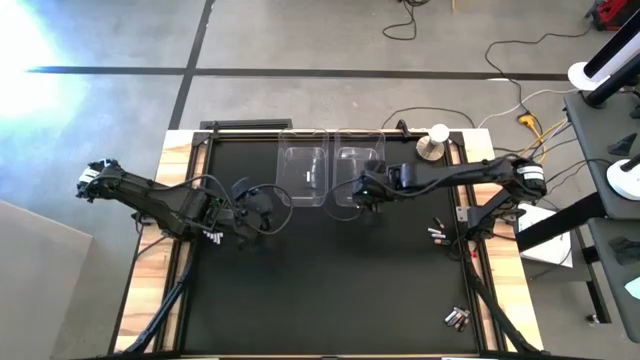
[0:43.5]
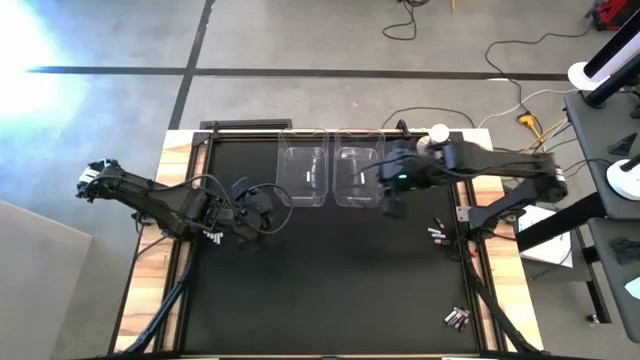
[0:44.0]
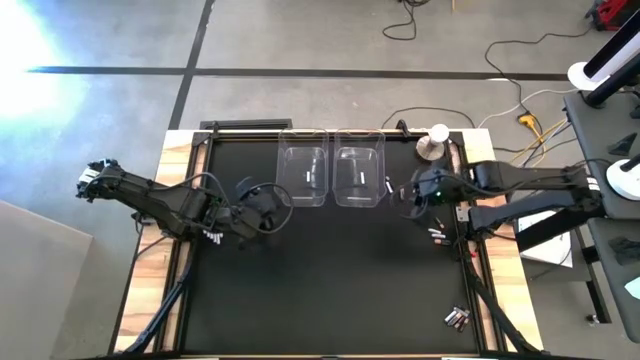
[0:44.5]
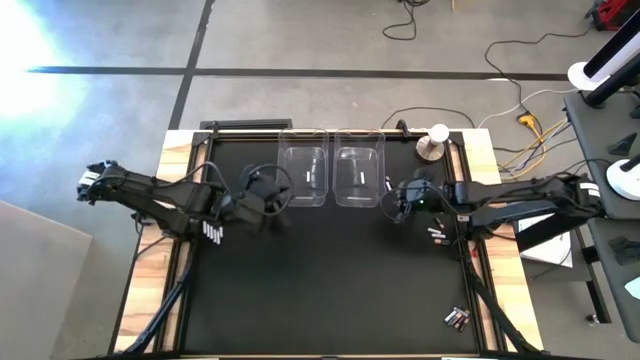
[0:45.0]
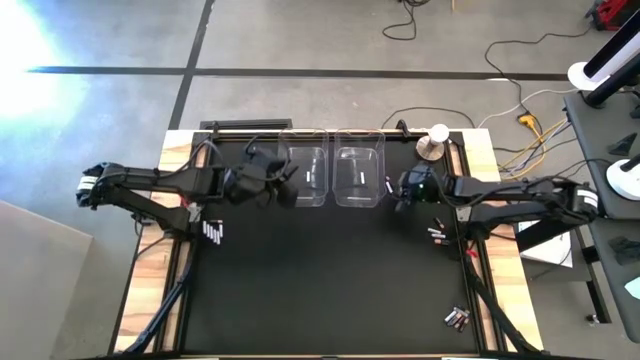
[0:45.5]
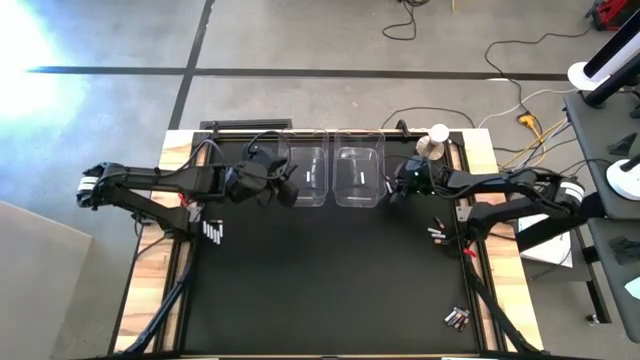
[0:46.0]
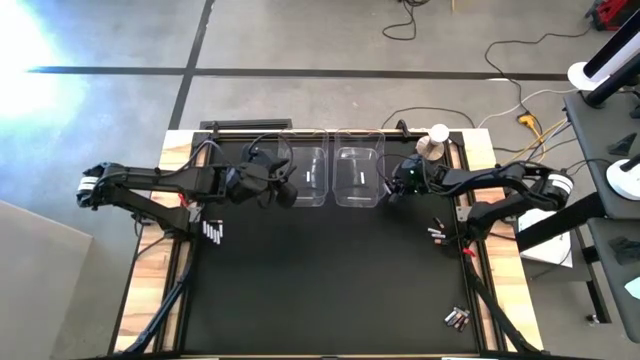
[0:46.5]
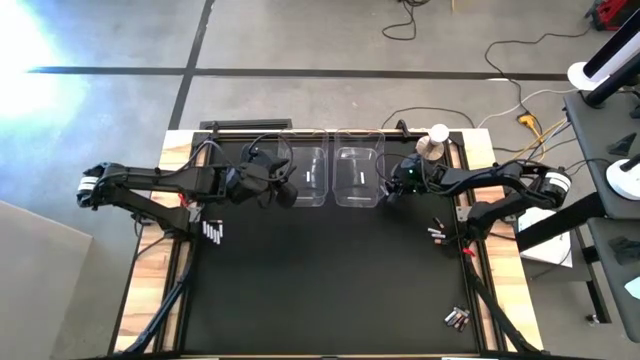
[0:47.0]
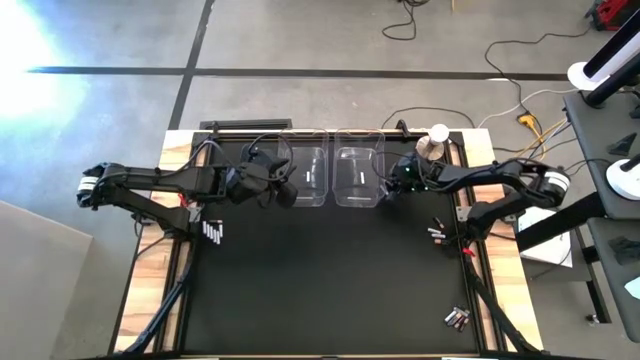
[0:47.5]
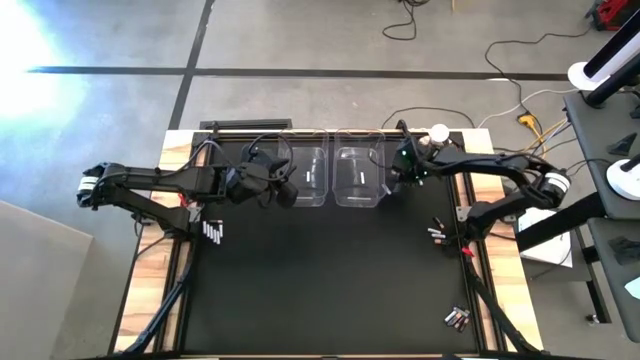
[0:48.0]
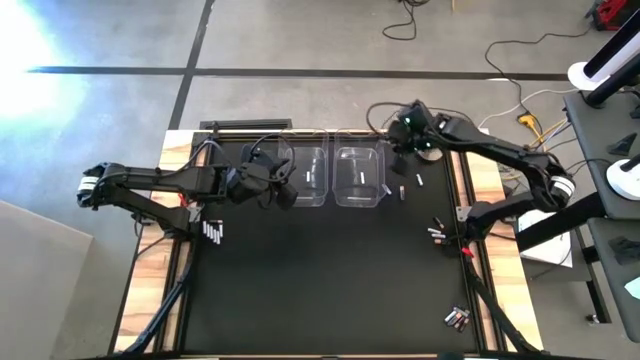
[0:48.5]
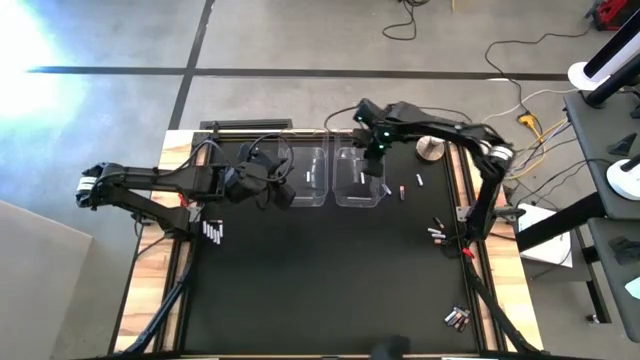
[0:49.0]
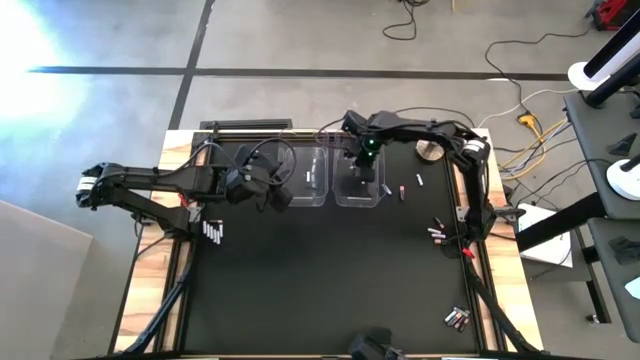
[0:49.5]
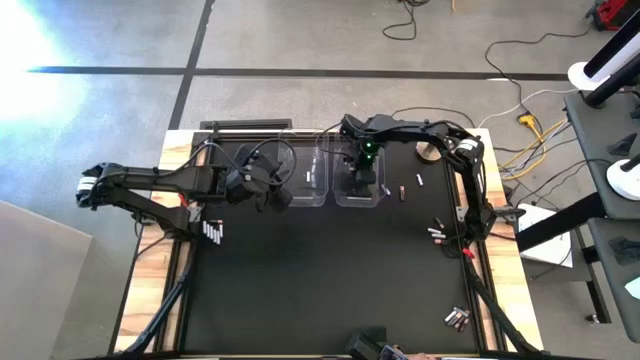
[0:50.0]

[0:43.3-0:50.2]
Task: Sort batteries
Put the black battery into the right transparent bin

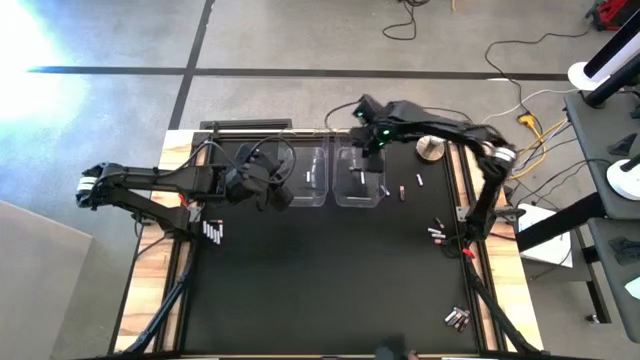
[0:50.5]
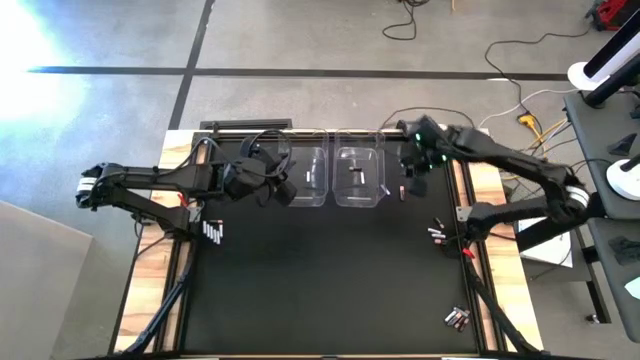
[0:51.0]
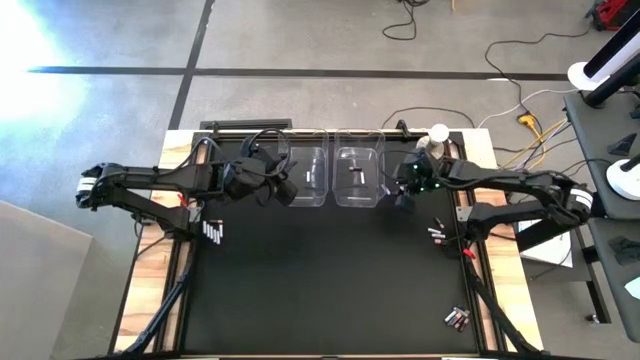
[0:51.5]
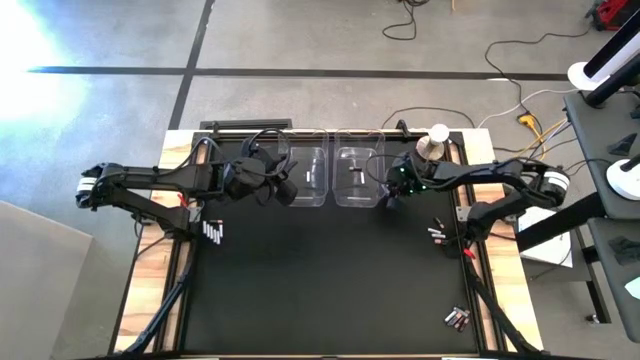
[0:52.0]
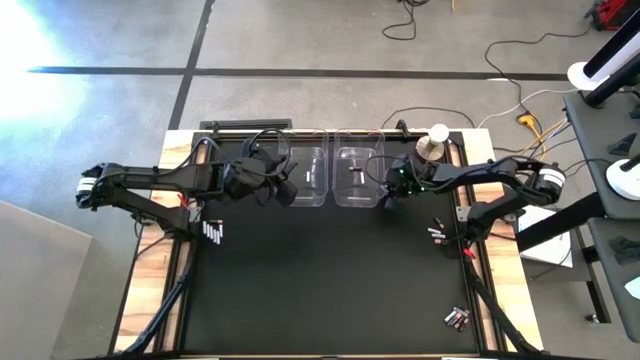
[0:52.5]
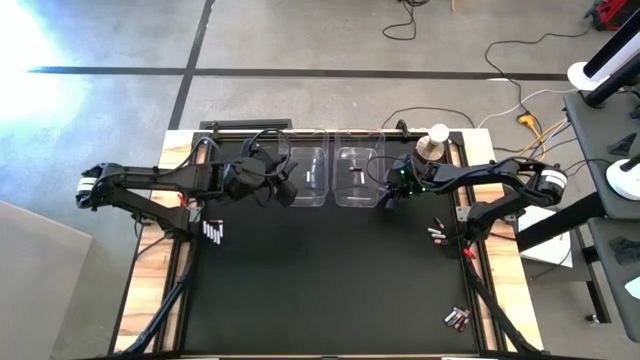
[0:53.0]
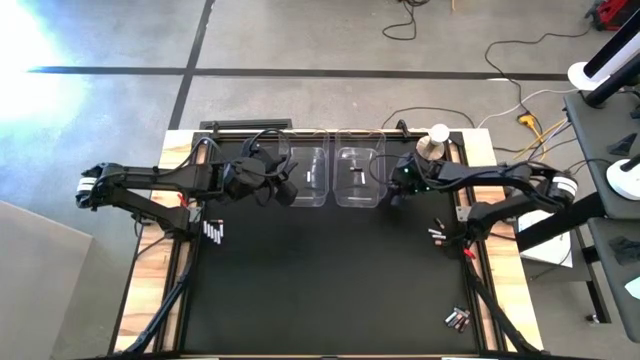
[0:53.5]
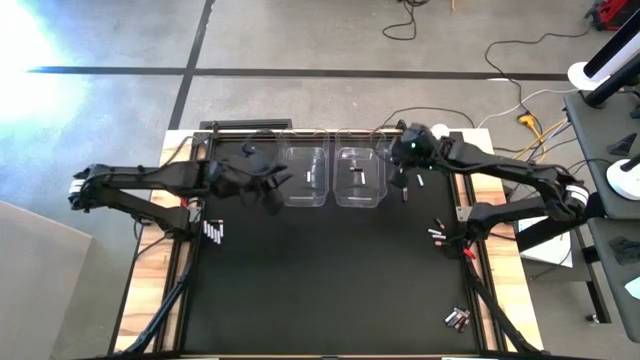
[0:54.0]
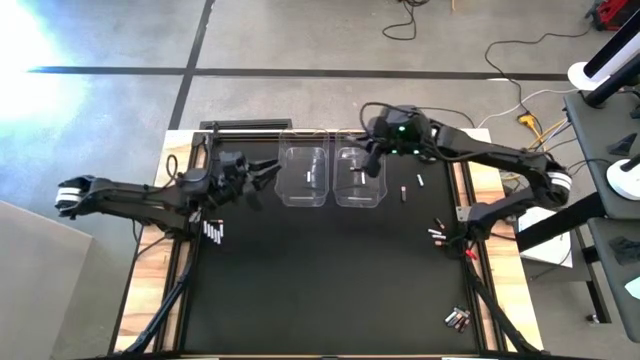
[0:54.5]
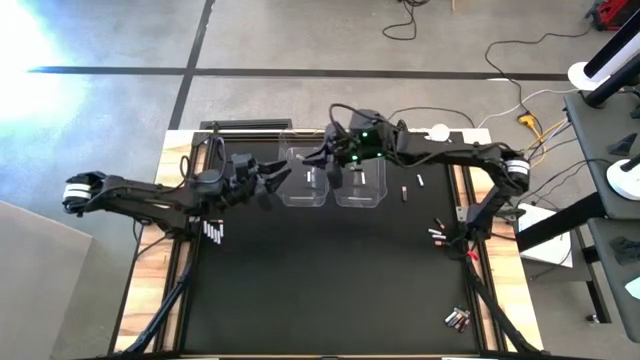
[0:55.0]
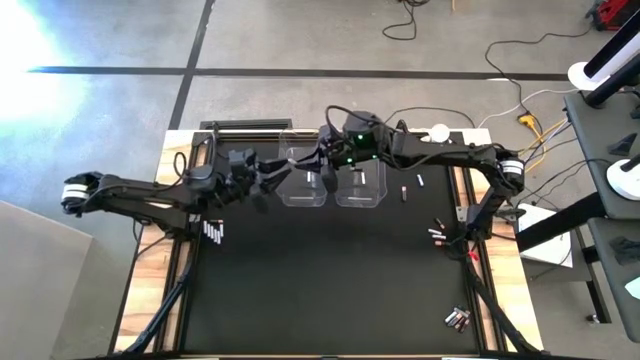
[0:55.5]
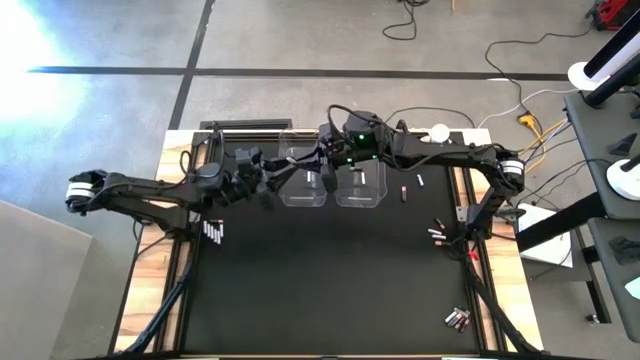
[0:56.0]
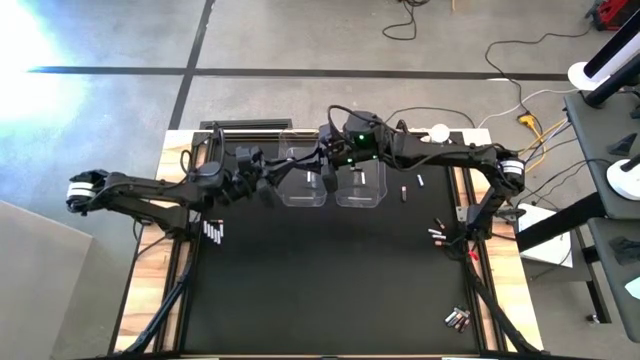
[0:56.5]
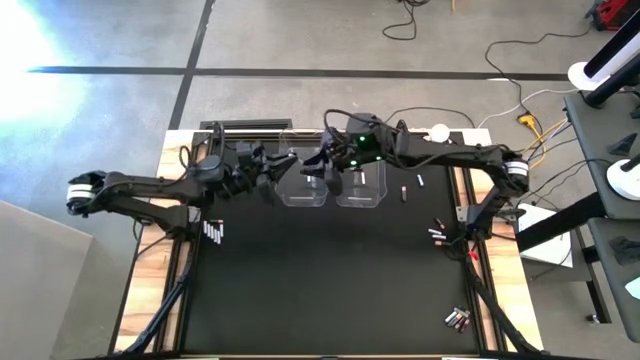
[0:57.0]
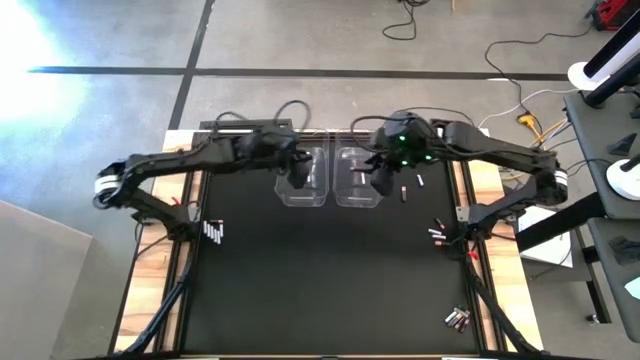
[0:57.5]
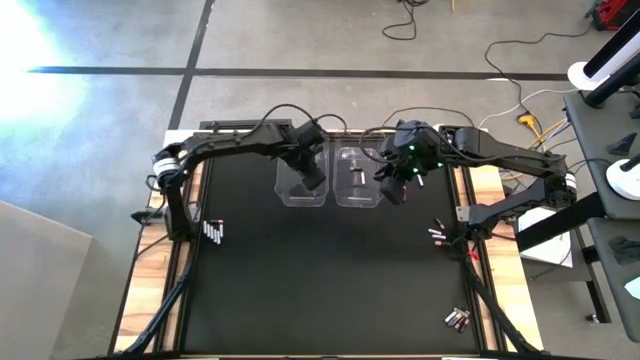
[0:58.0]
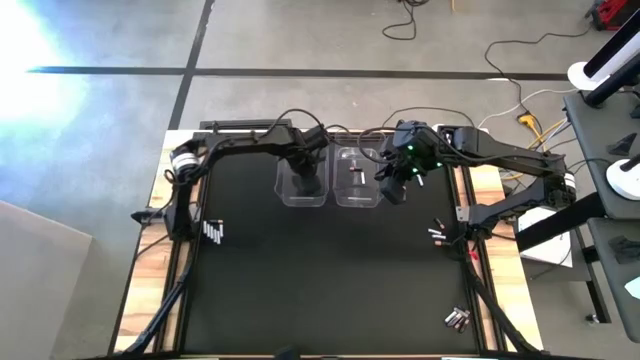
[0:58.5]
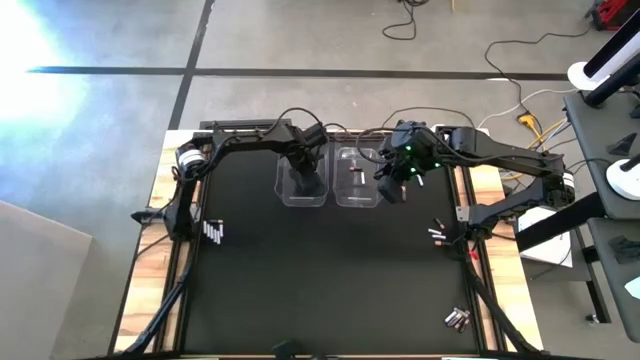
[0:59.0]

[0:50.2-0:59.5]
Put the white battery into the left transparent bin

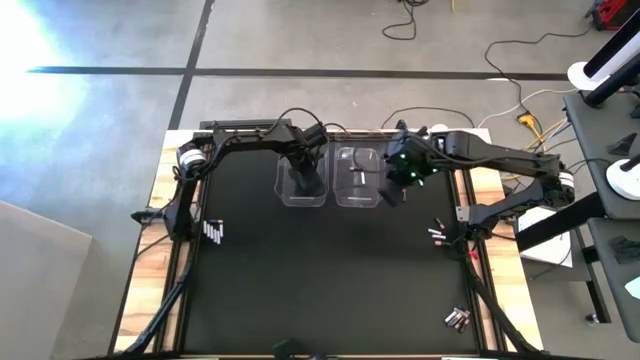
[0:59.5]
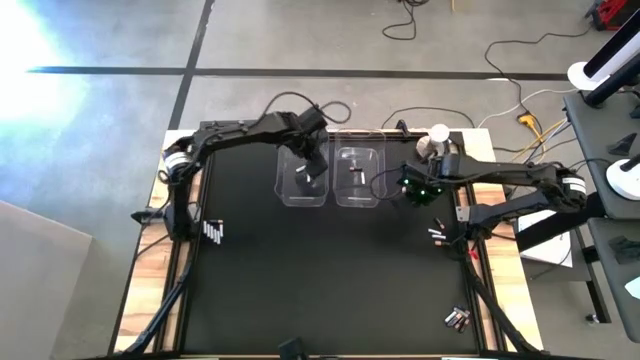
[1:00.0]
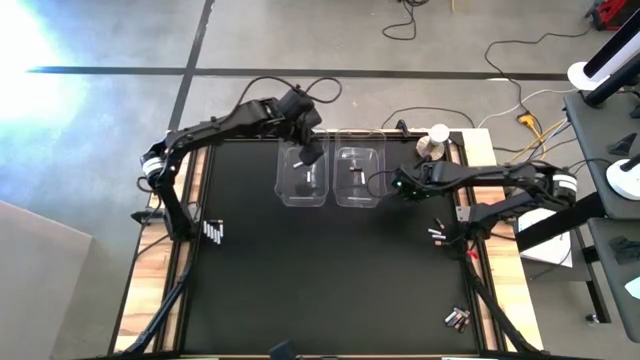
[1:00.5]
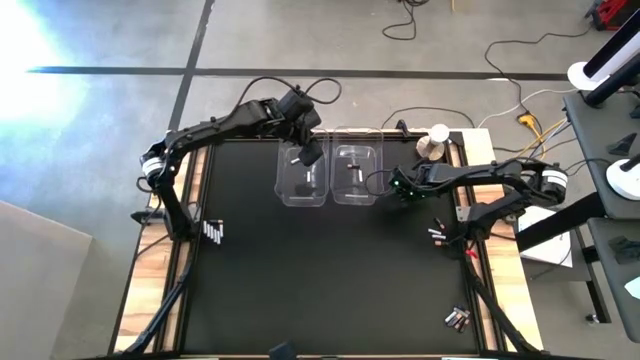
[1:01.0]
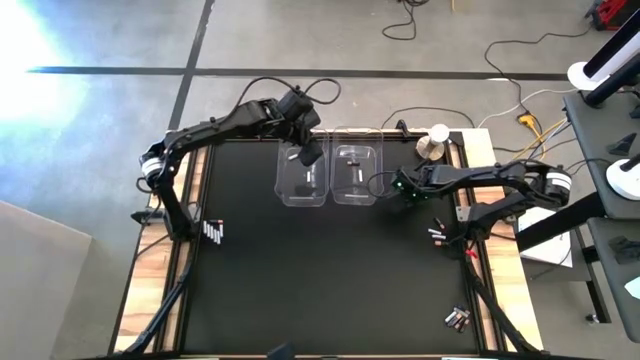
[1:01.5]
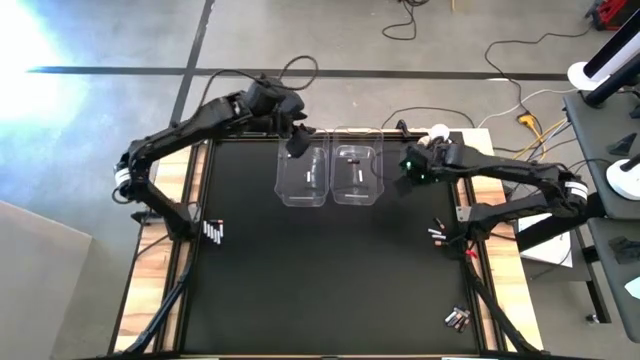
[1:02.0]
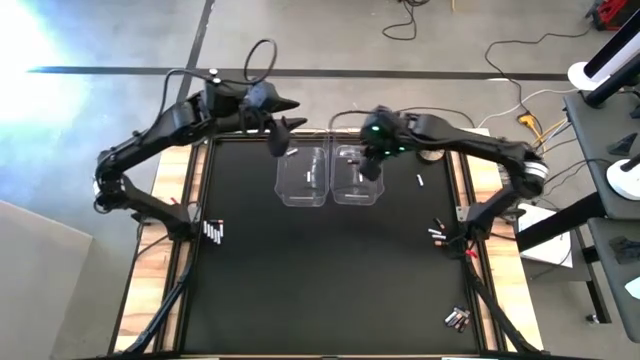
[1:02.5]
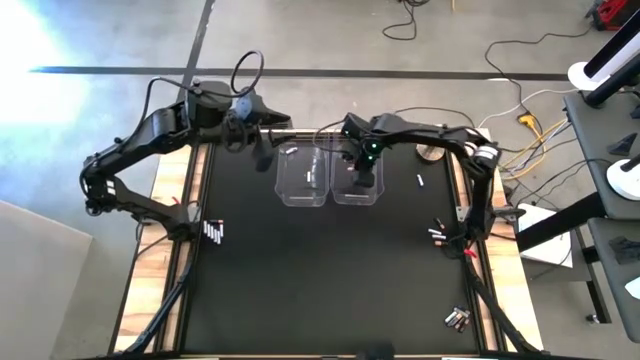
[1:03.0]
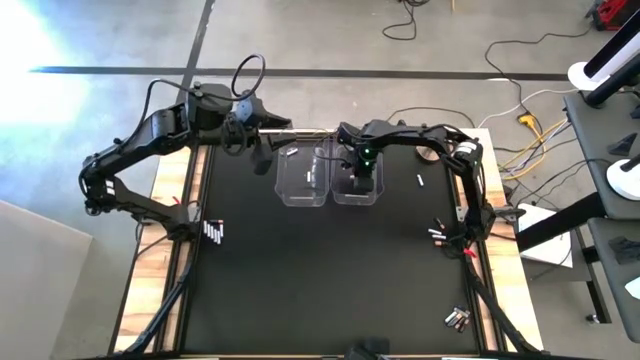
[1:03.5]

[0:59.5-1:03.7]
Put the black battery into the right transparent bin

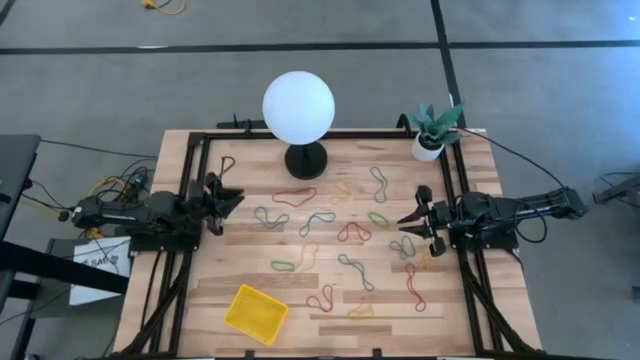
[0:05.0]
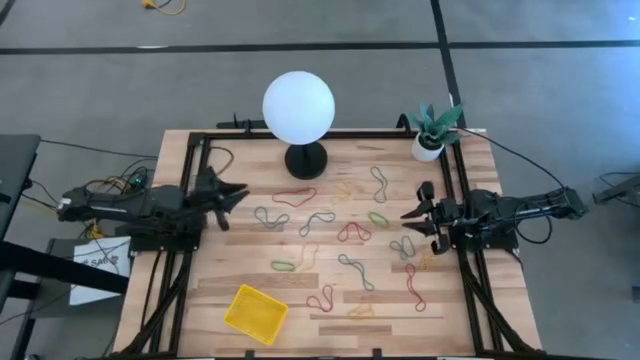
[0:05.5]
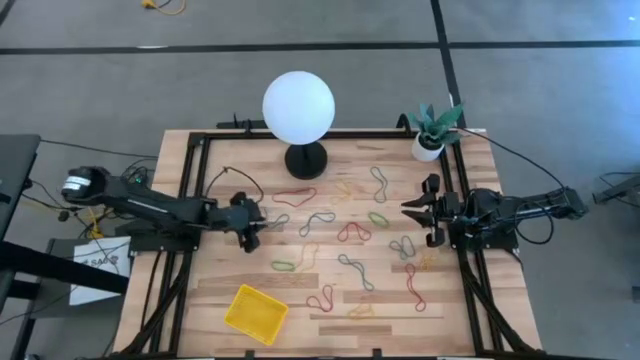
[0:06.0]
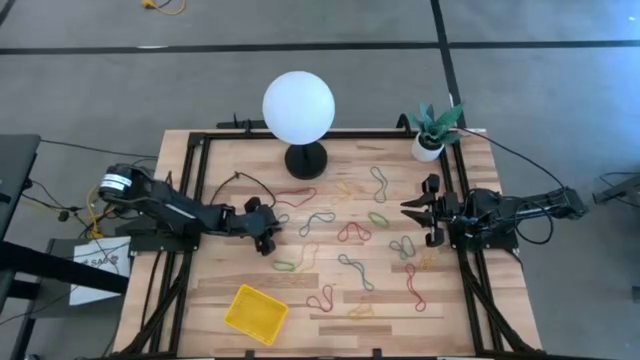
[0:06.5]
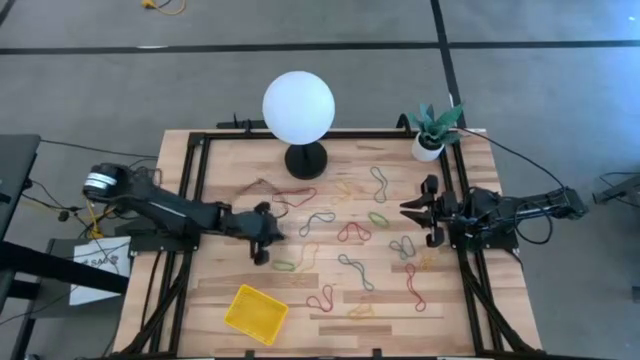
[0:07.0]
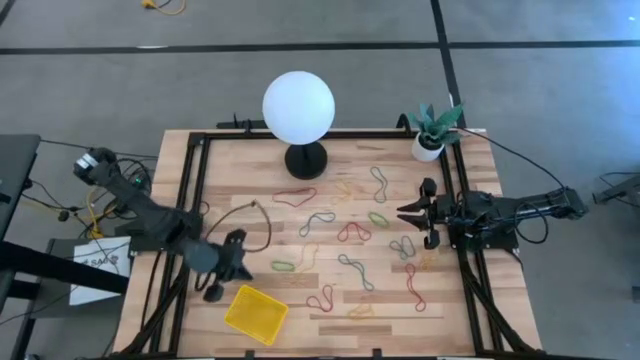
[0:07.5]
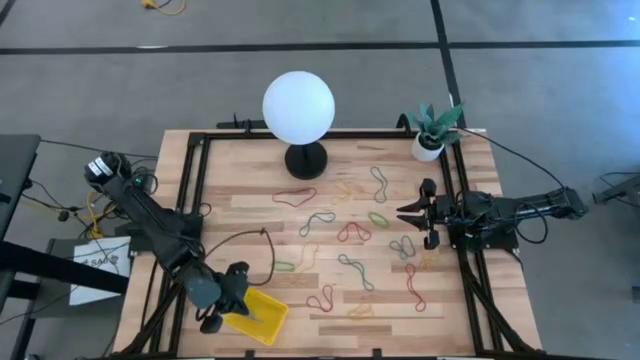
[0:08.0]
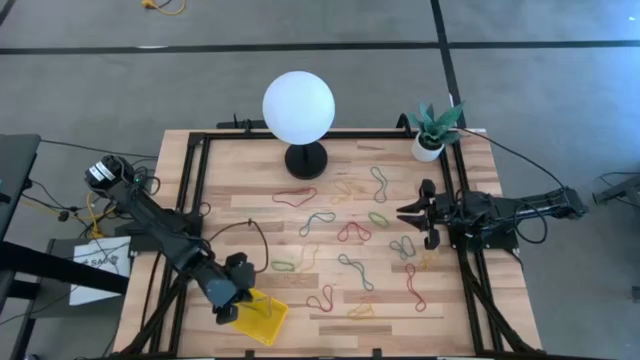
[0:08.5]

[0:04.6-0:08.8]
Task: Pick and place items into bin
Put the blue rubber band into the yellow bin
